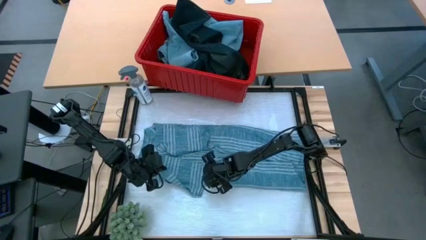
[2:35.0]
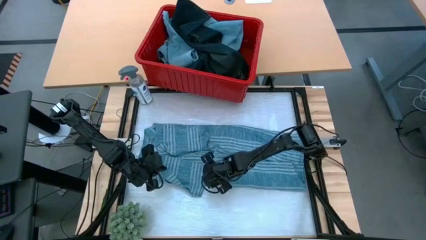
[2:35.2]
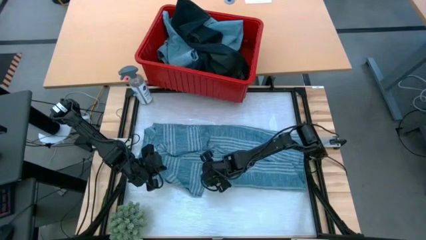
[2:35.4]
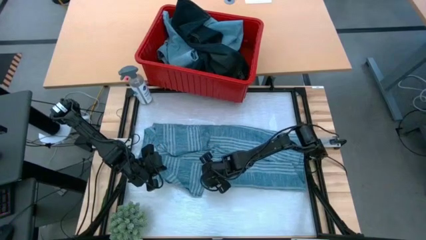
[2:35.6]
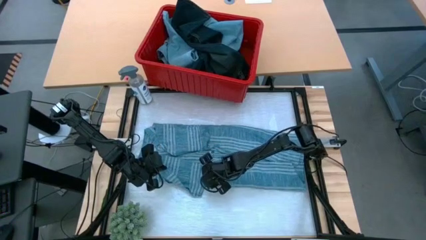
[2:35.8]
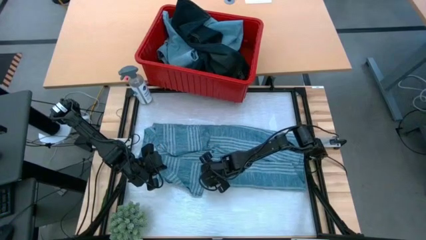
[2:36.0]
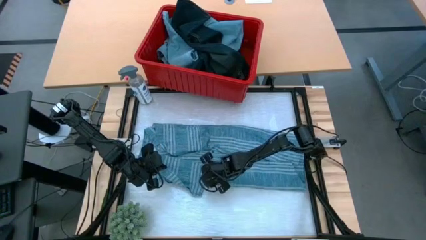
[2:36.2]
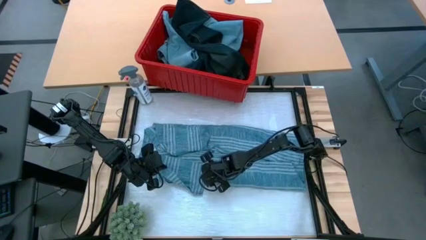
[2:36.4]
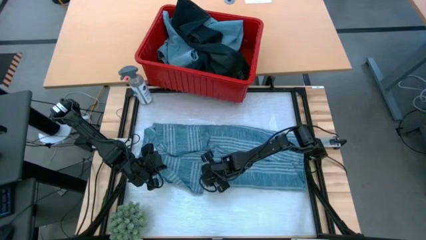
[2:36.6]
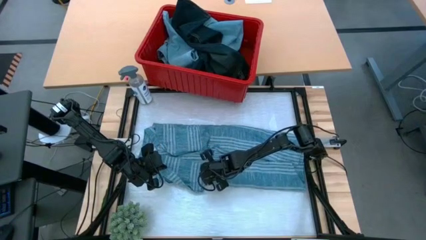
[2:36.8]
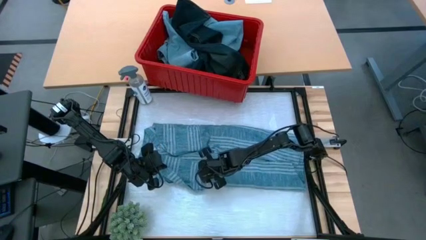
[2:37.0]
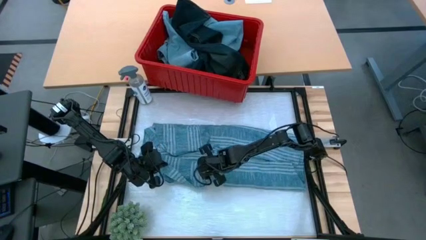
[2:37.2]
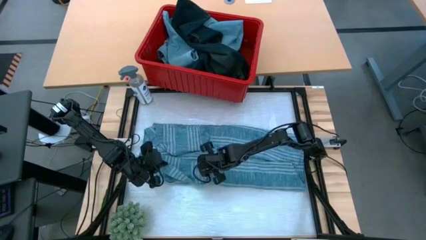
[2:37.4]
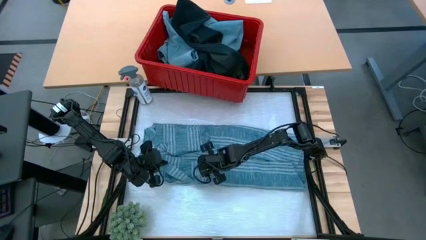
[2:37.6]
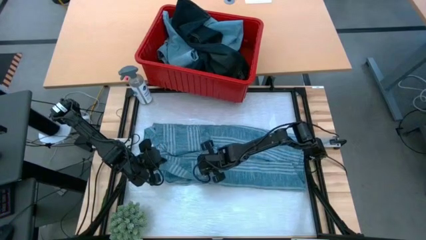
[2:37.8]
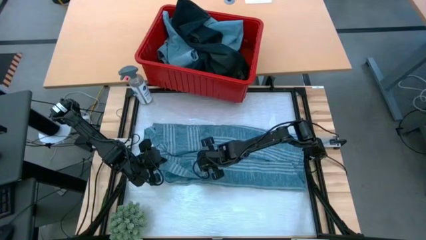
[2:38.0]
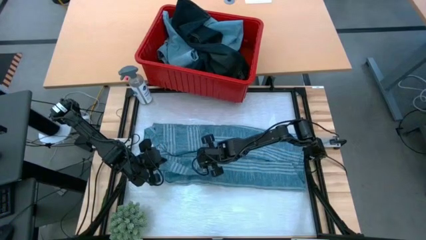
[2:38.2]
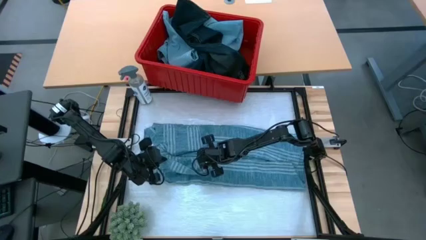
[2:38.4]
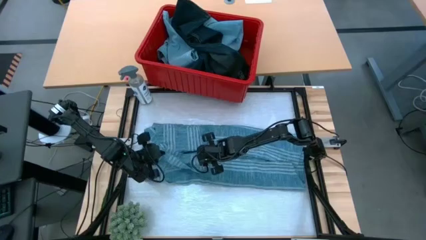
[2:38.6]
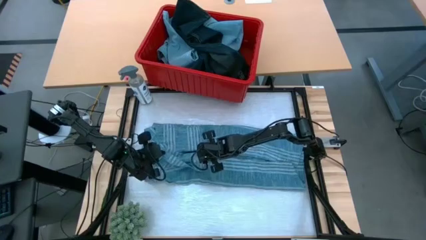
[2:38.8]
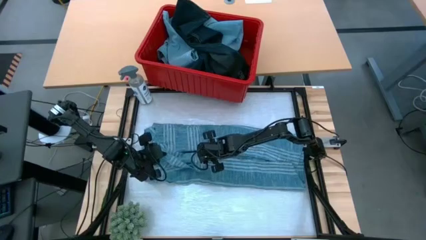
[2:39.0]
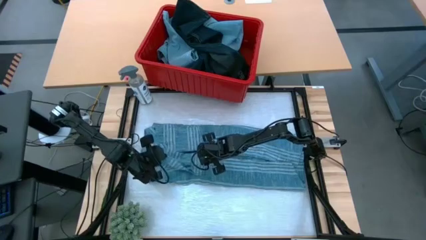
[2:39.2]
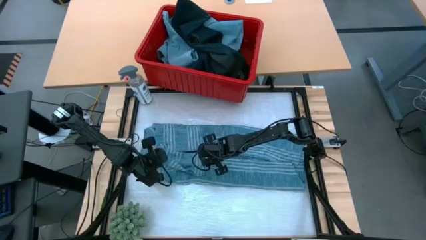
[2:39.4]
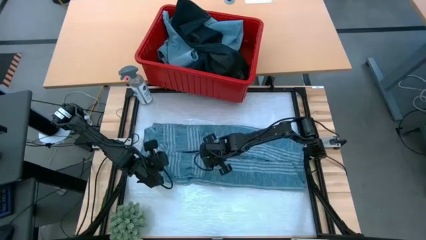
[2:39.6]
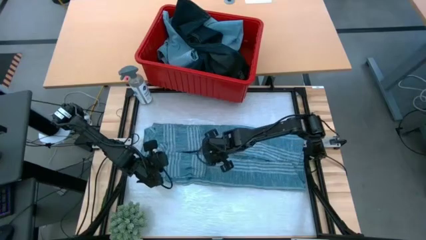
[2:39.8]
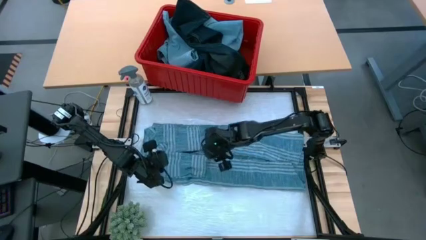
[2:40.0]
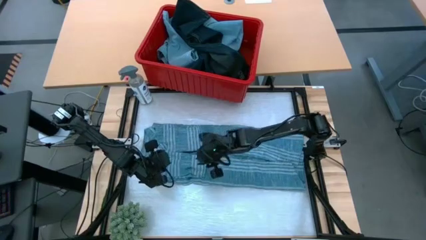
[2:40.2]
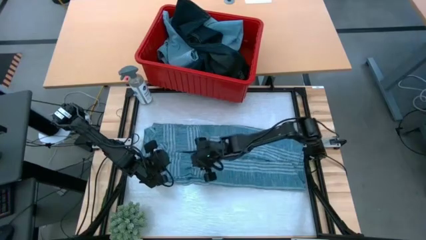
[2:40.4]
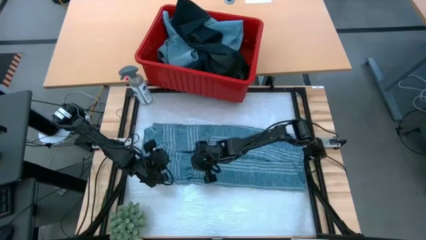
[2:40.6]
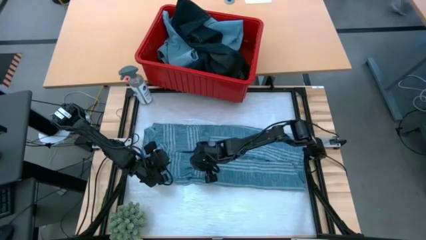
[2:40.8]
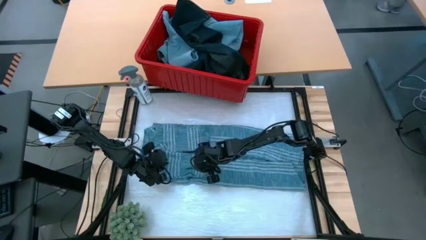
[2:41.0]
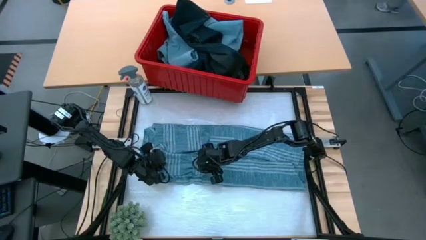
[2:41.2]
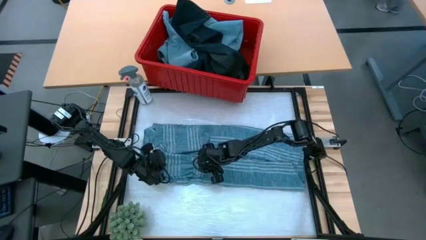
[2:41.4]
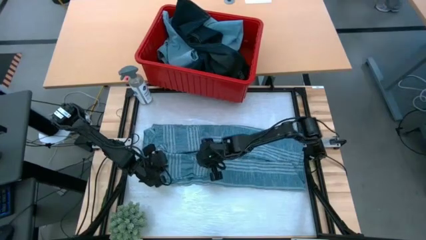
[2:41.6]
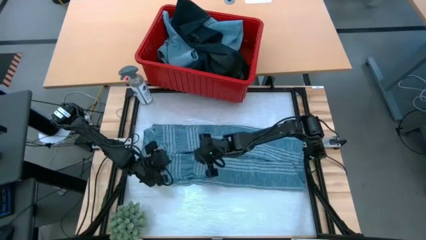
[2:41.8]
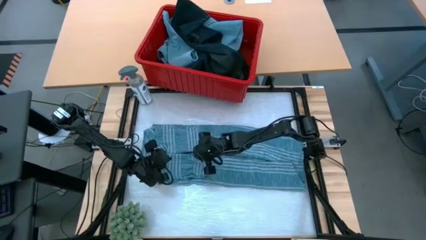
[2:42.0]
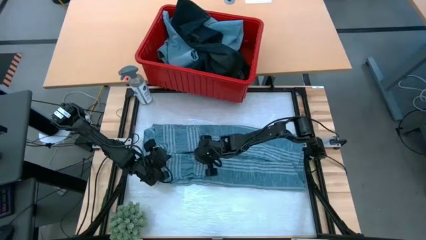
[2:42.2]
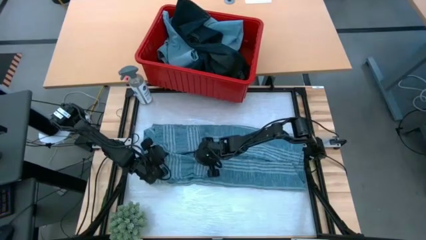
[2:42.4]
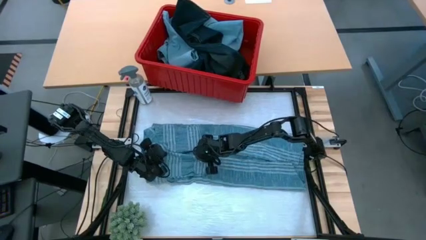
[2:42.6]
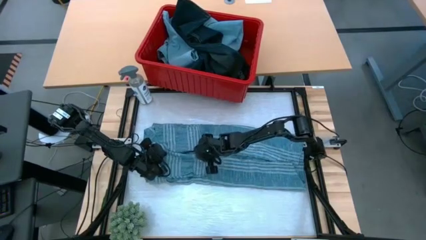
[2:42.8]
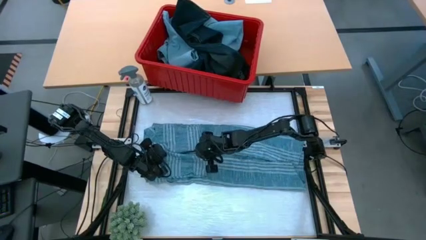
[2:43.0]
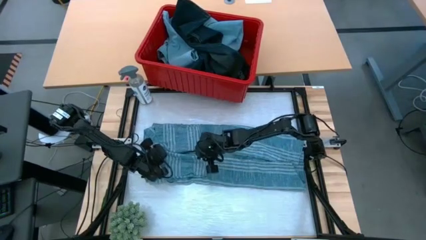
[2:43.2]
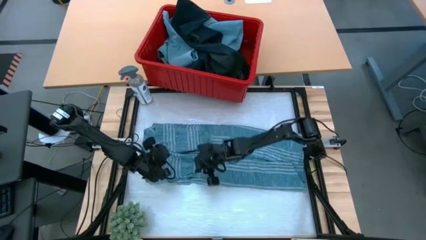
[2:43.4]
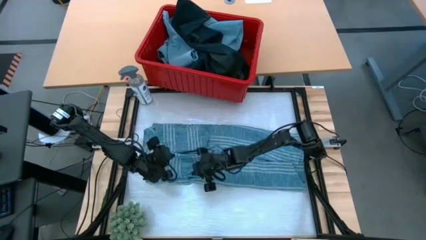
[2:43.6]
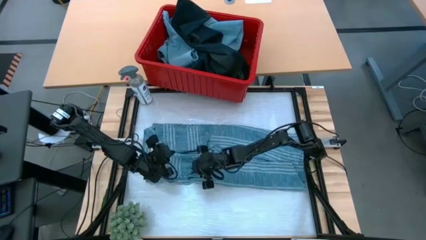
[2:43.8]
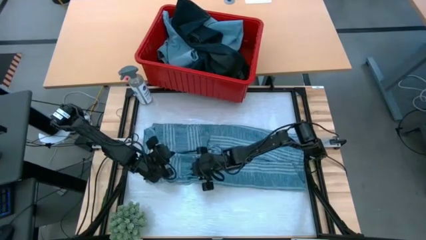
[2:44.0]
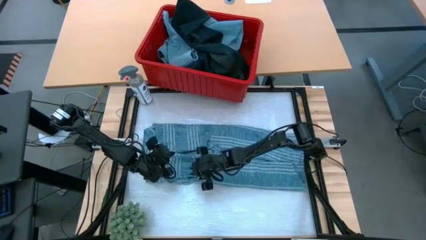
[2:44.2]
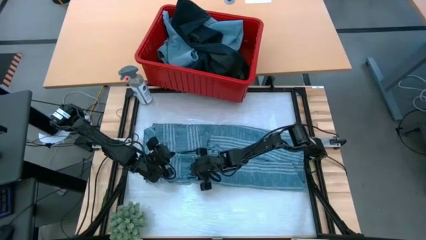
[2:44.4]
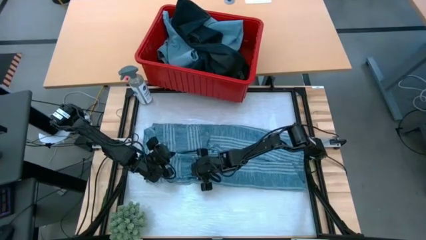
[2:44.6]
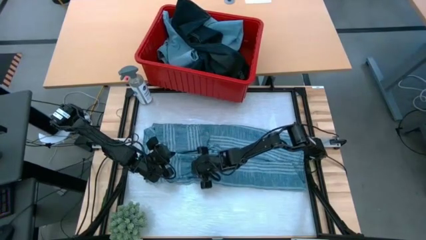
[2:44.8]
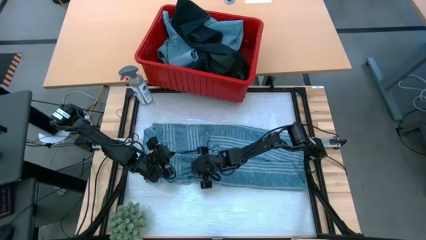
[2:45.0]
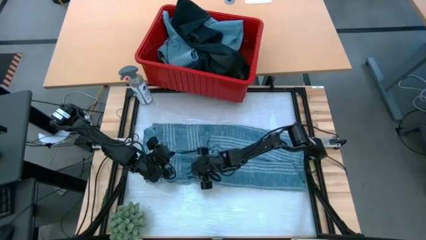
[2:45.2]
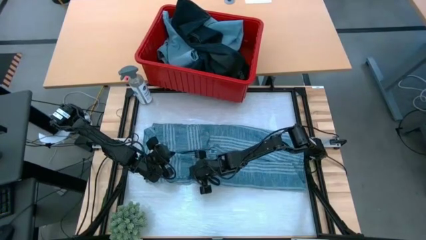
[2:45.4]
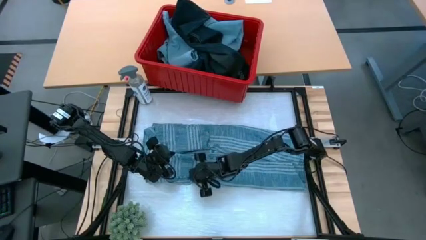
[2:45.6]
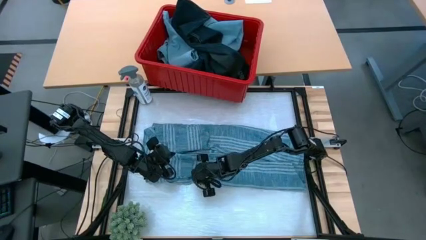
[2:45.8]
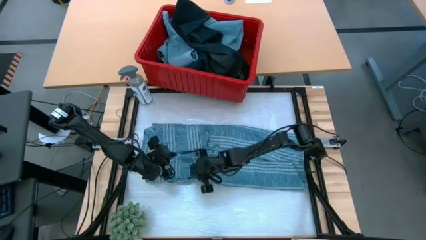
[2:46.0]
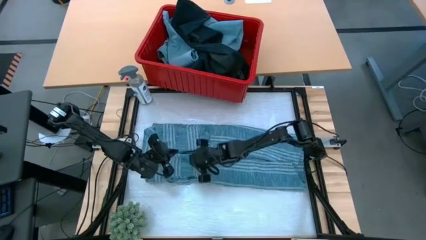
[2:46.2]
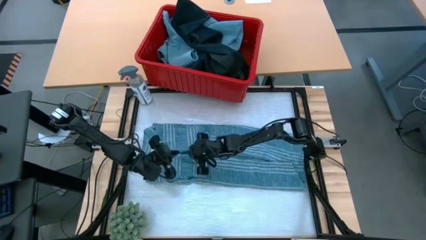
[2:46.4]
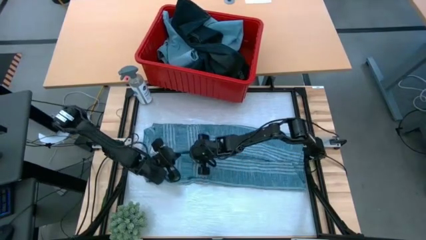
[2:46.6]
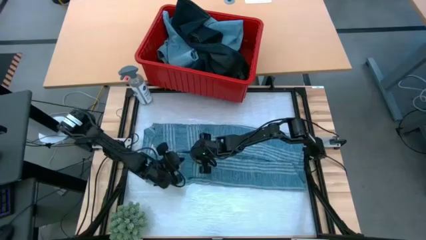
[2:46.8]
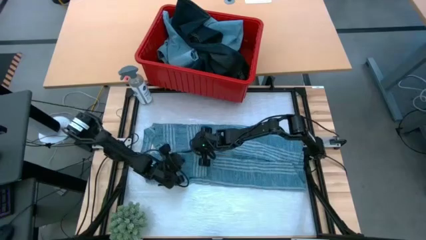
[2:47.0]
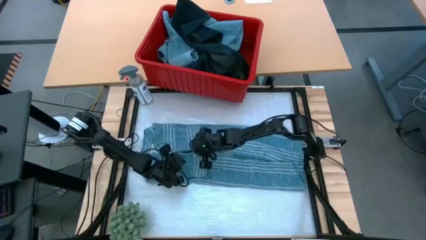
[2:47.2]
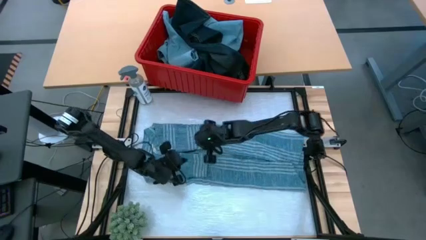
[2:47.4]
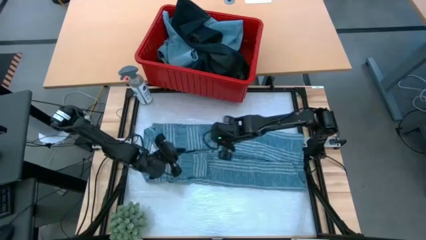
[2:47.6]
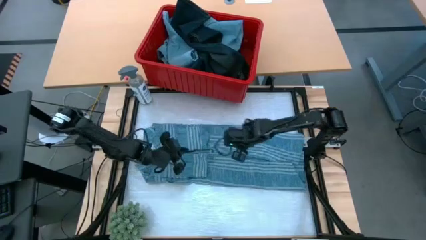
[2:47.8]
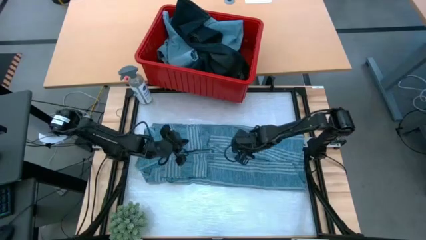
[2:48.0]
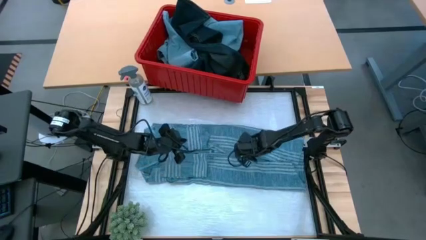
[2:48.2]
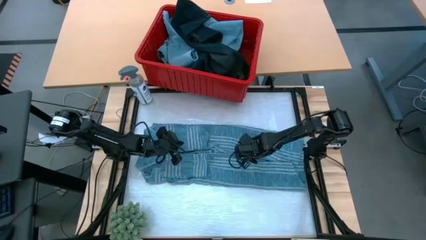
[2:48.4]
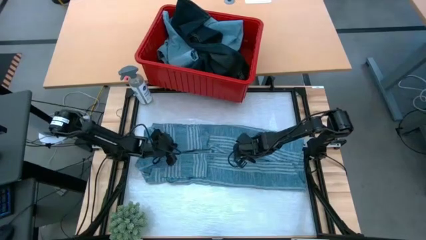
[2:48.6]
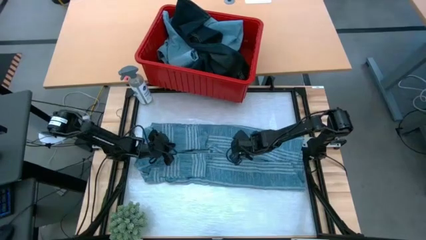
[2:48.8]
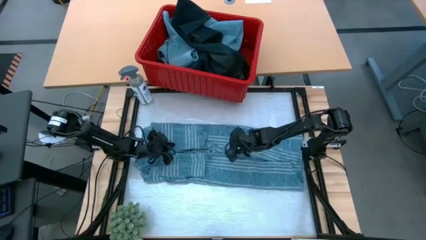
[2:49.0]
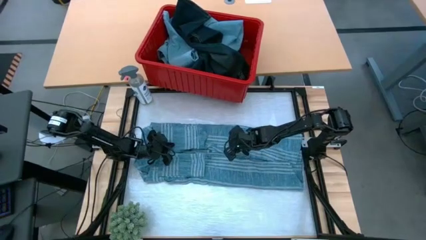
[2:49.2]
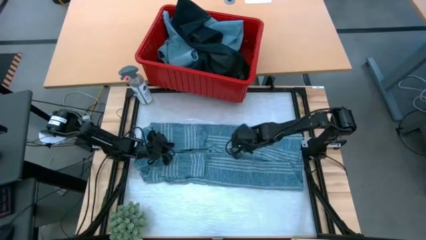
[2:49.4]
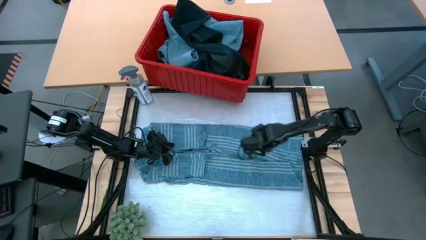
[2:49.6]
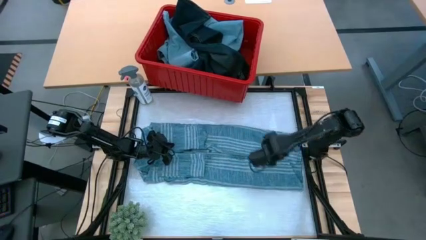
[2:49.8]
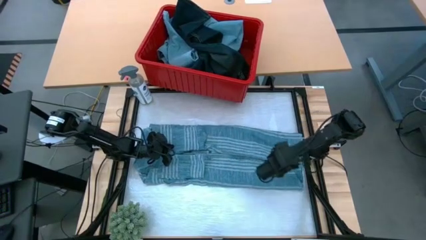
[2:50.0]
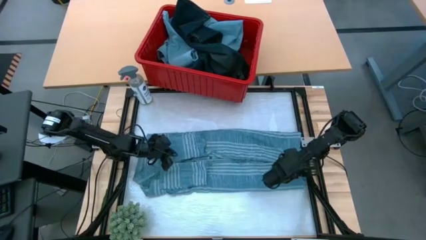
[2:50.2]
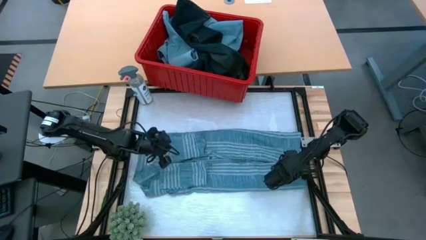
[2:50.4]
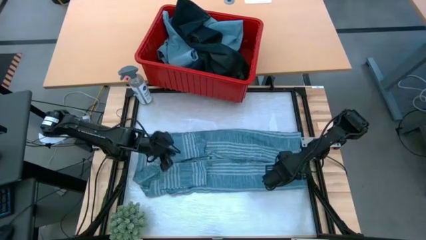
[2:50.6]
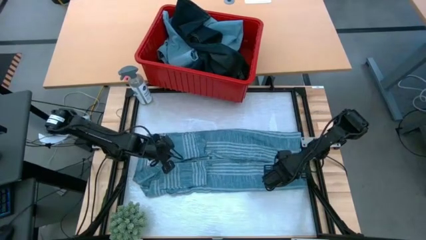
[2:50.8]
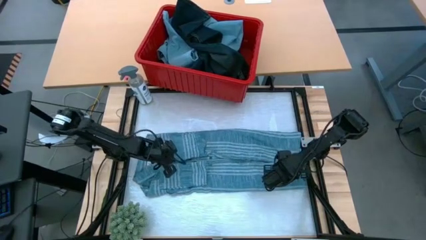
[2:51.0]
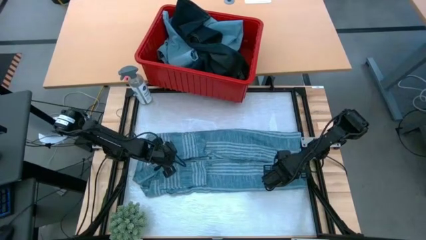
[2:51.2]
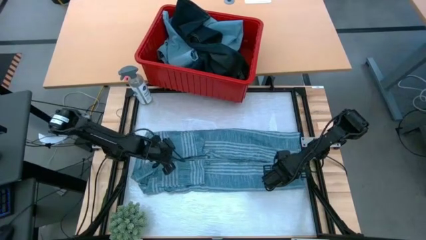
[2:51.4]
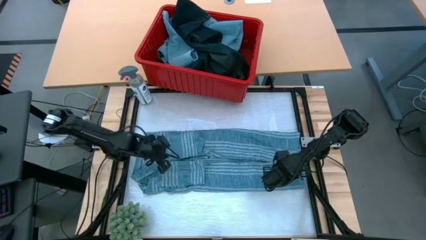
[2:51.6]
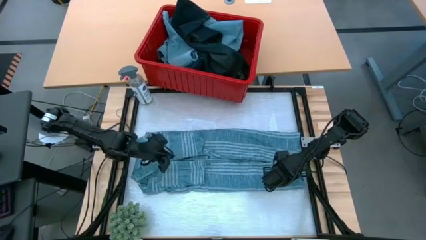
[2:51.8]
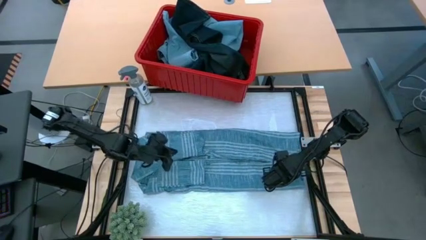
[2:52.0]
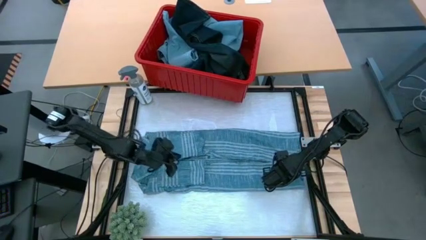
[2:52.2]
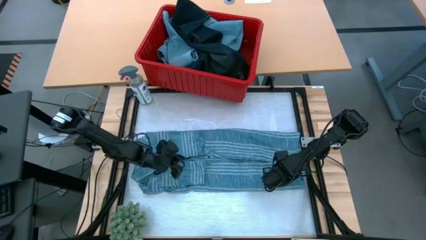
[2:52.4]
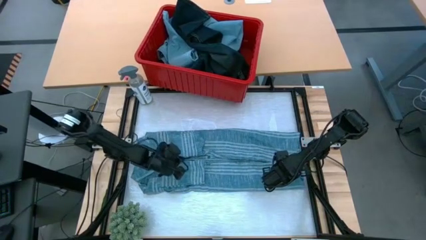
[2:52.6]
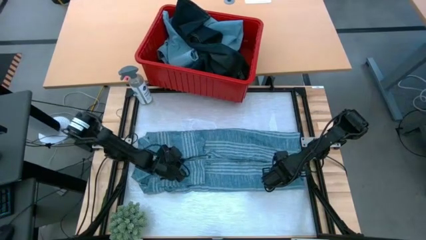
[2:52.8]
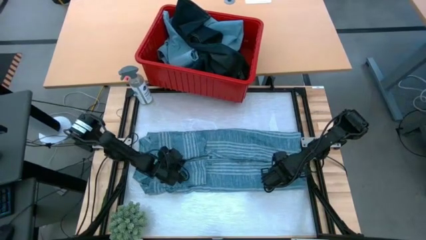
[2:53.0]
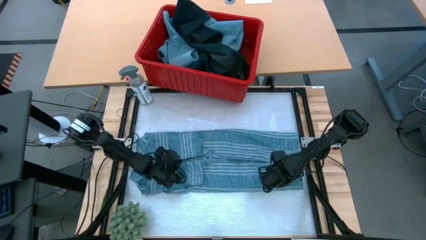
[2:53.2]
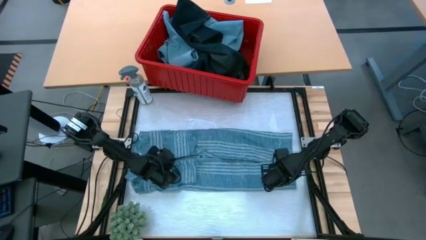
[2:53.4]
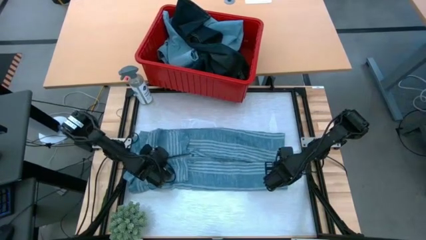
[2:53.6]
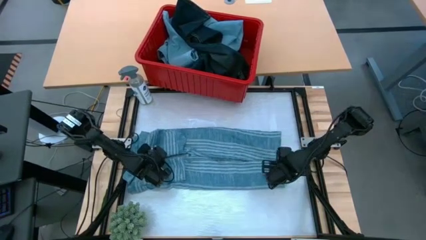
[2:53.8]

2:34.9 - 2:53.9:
Task: Fold Laundry from Bin
Fold the light blue shirt
